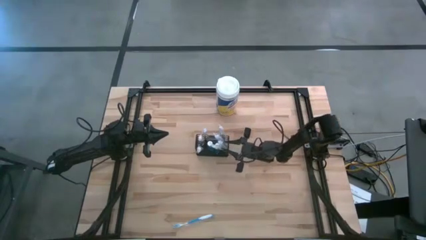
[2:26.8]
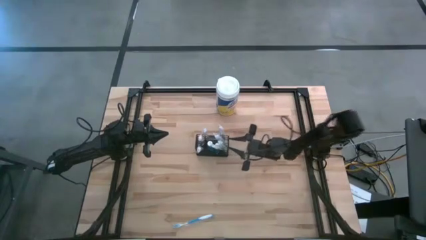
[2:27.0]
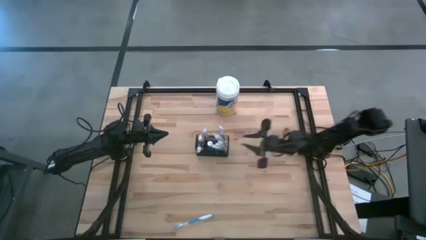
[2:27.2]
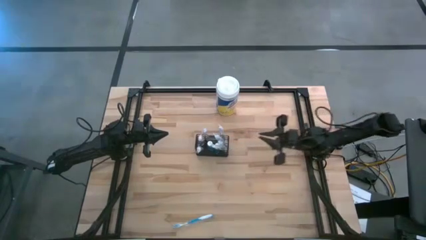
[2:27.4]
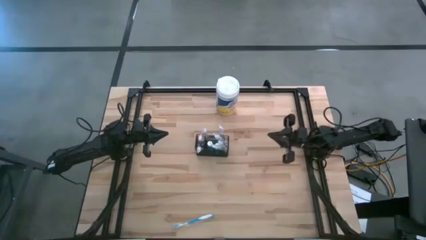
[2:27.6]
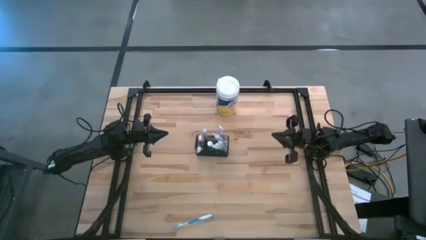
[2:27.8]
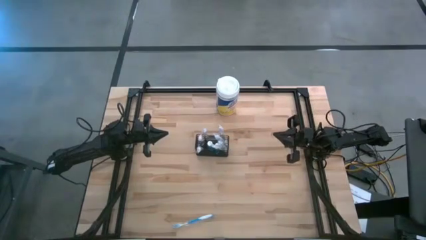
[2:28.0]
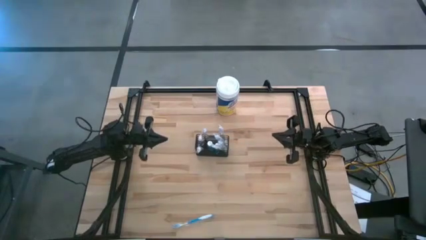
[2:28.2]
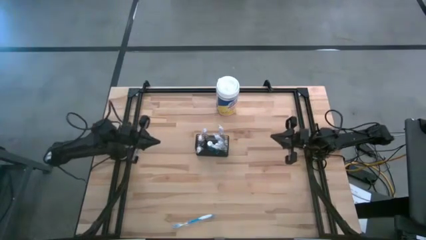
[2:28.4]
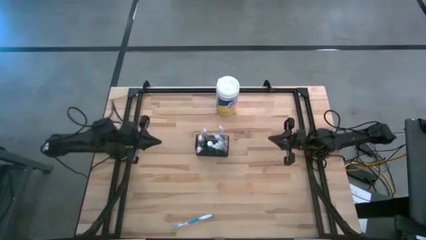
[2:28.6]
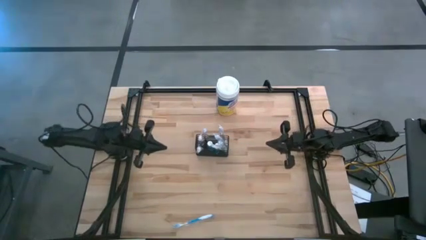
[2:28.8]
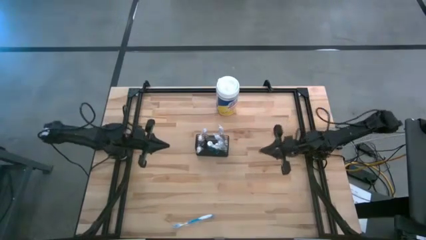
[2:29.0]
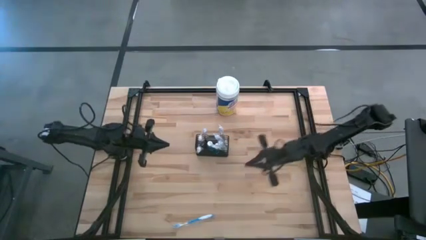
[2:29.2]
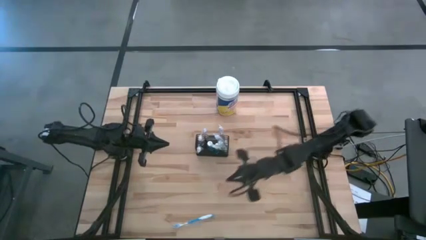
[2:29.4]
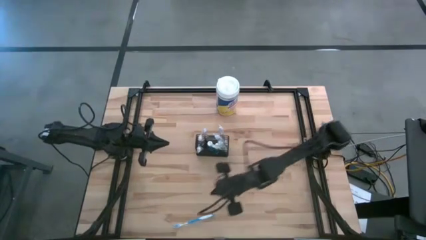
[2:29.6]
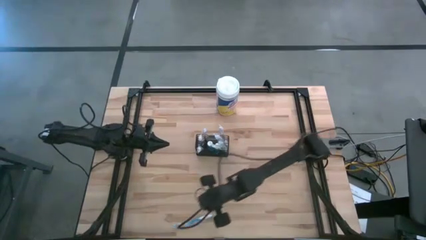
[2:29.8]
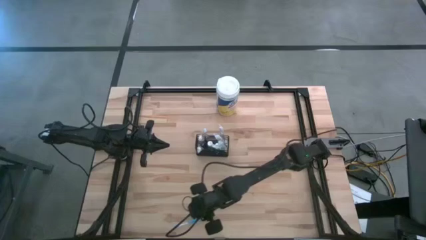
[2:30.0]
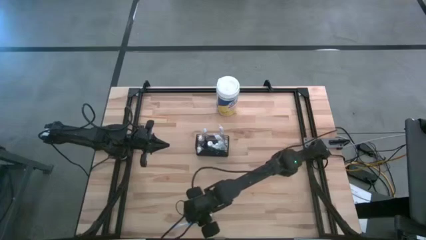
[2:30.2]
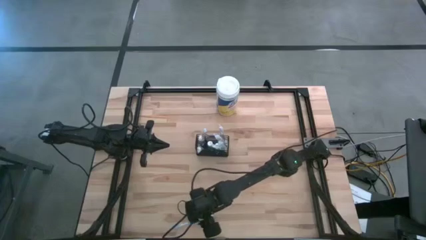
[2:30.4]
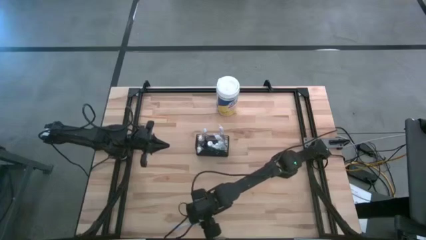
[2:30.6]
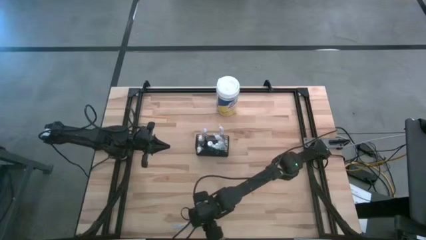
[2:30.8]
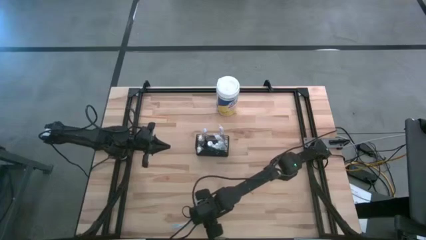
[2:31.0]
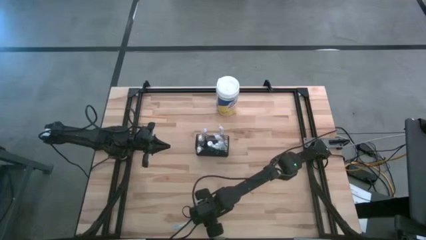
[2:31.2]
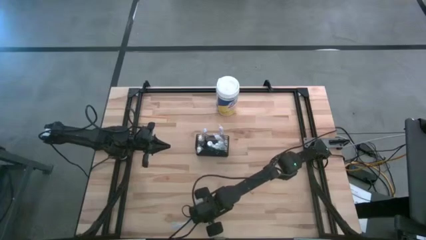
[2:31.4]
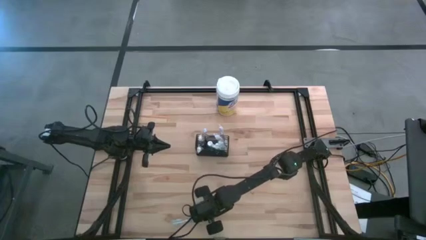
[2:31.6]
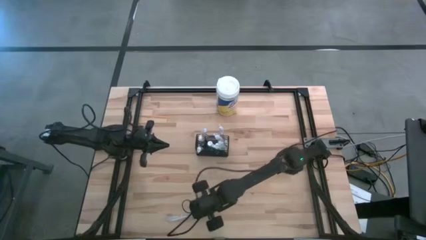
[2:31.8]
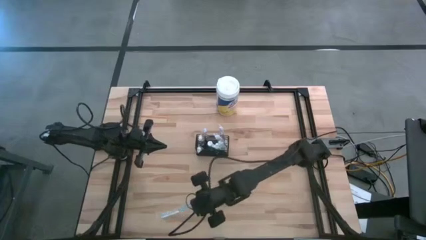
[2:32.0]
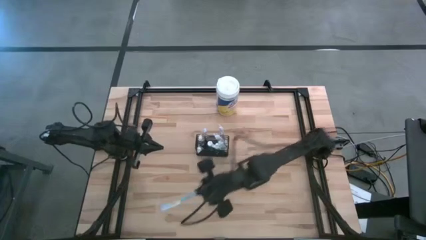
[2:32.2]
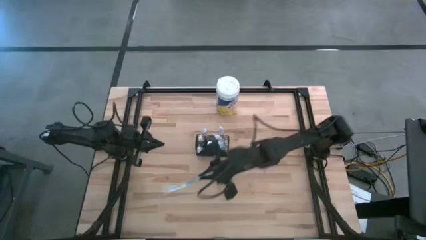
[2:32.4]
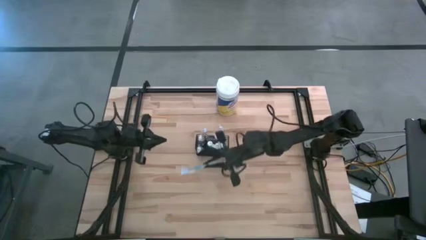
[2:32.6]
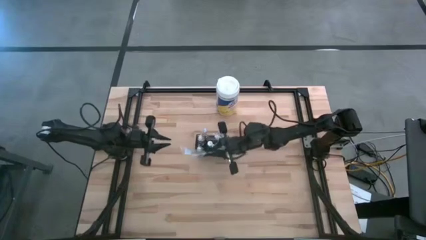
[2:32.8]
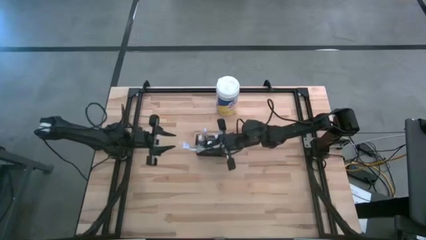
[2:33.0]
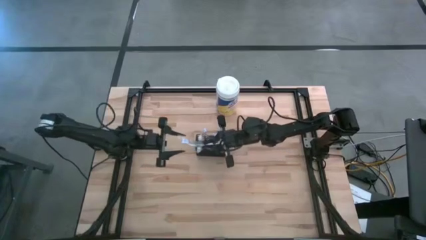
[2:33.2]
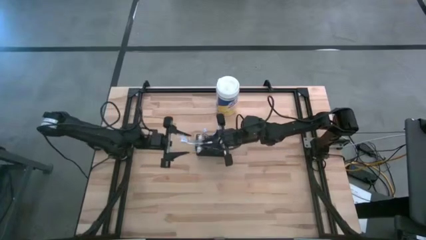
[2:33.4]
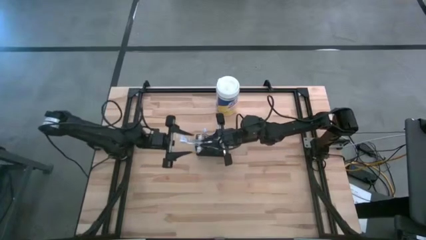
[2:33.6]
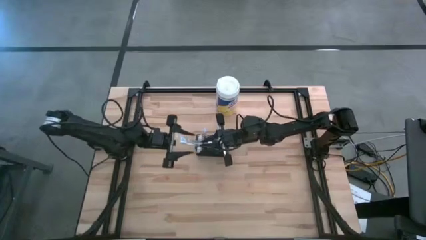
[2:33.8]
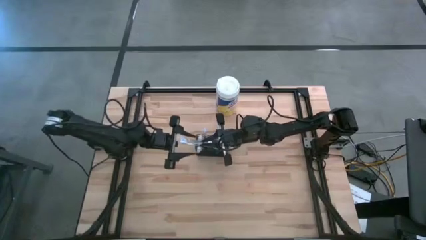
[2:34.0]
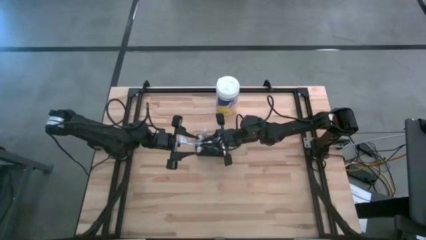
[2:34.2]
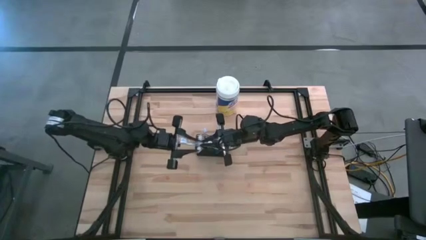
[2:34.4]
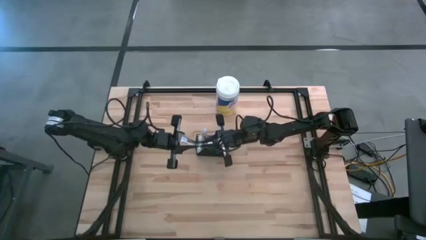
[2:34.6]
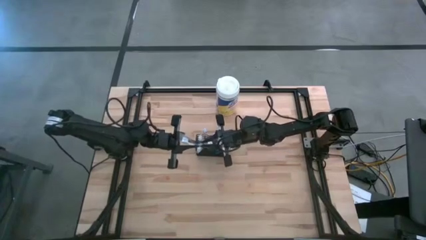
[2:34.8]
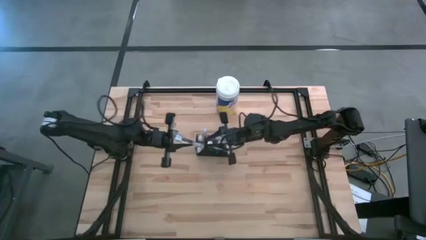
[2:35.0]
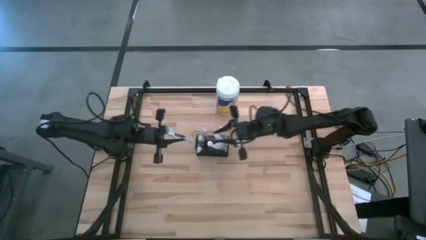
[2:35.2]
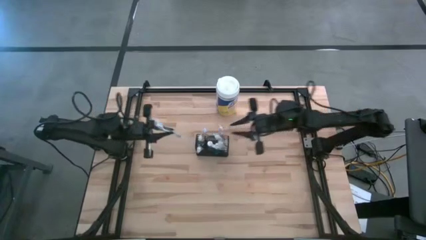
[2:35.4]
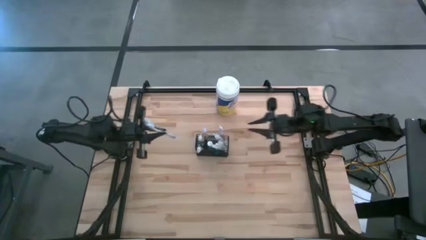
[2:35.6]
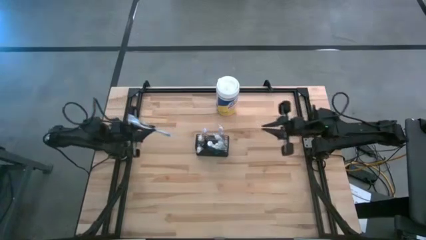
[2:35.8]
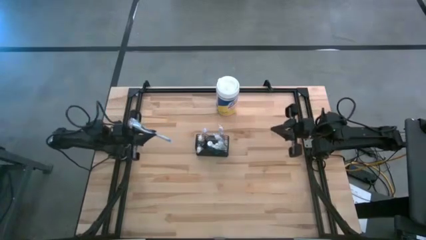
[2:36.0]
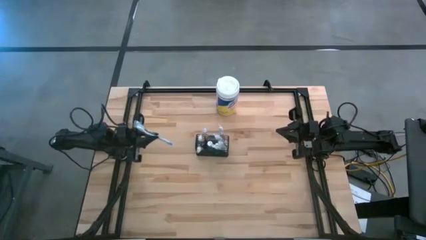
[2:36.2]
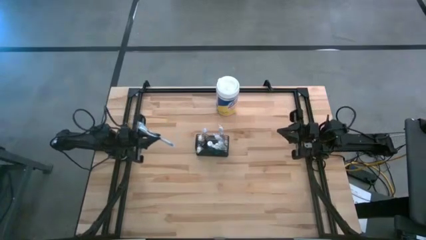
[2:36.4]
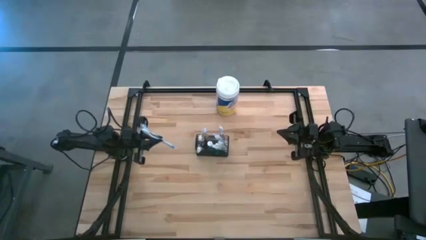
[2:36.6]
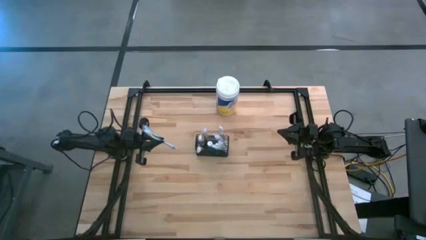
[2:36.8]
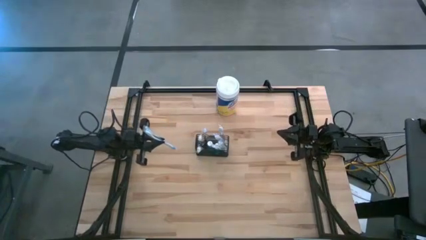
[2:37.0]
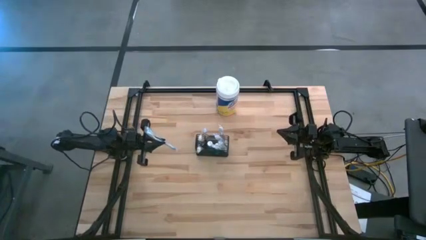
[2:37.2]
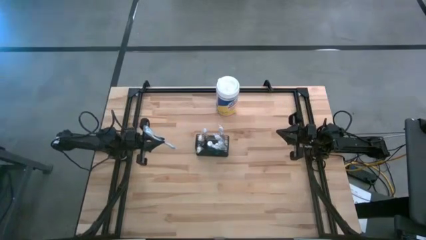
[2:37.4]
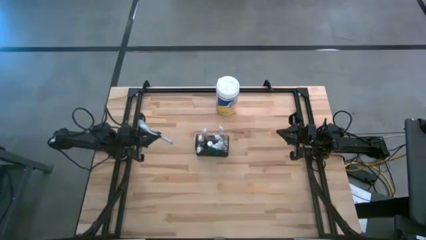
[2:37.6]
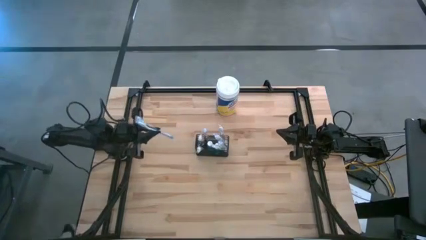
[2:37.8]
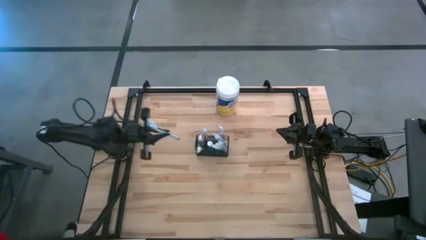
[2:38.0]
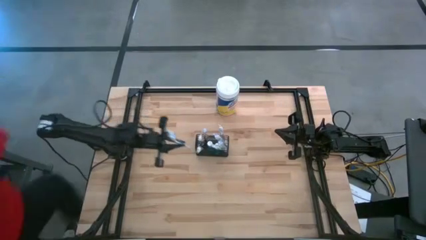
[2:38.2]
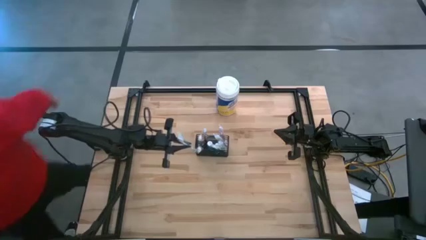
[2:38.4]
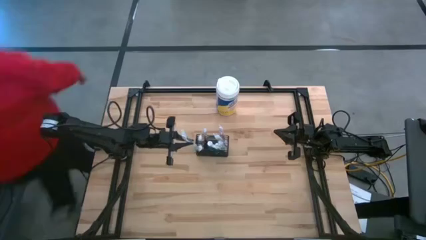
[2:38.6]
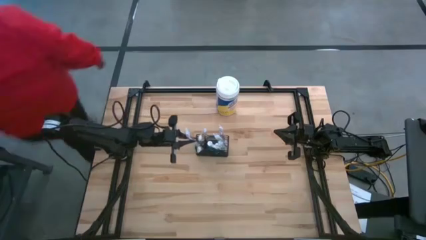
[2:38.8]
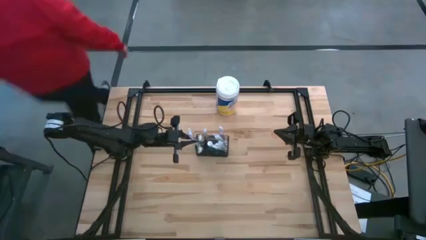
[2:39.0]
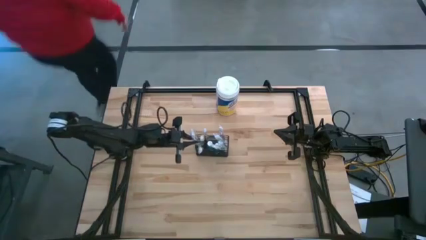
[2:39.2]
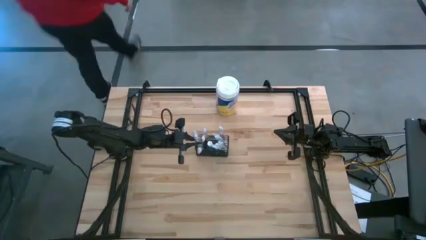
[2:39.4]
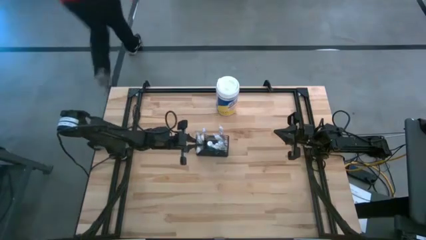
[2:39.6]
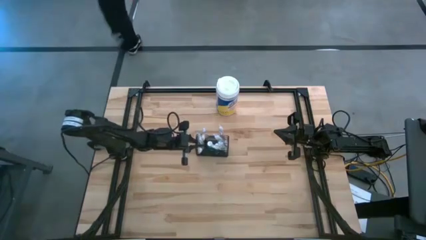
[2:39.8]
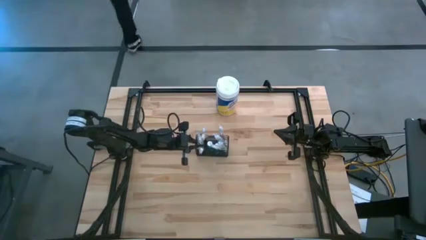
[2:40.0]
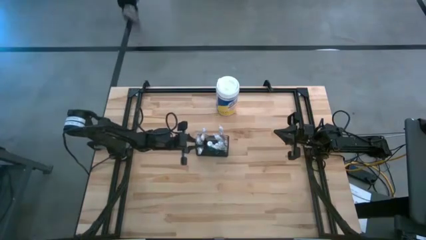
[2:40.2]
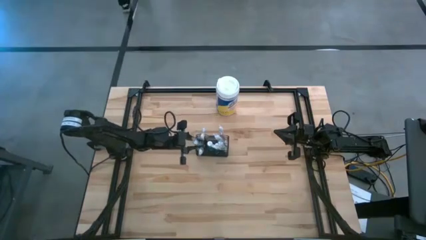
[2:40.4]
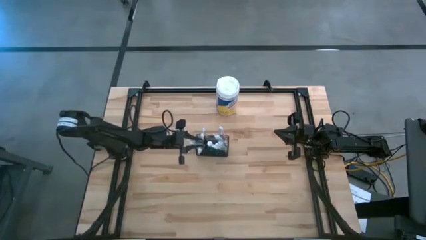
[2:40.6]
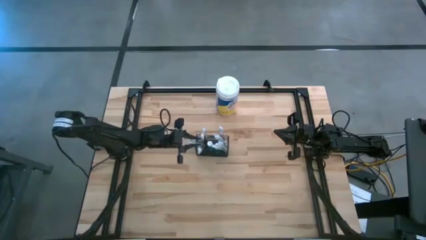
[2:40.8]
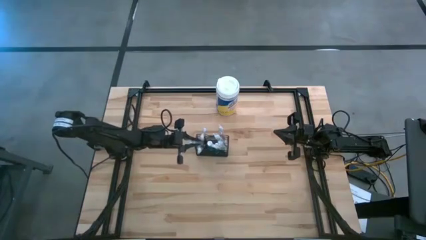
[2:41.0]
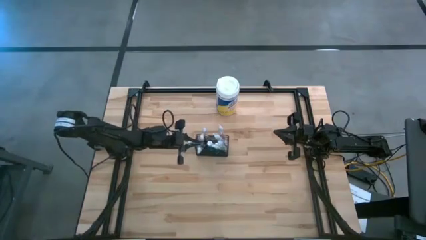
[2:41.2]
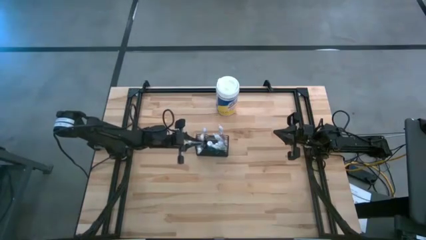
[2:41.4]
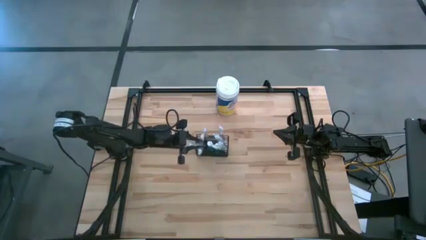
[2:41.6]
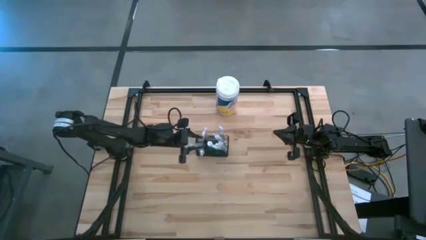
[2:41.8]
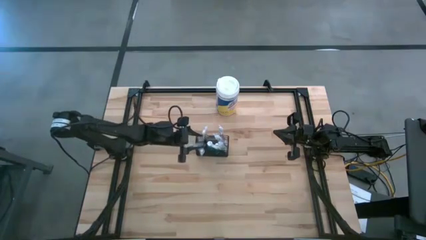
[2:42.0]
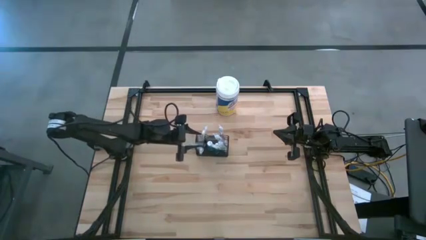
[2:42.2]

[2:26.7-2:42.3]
Task: Pick & Place toothbrushing station
Put the blue toothbrush into the black wire organizer
